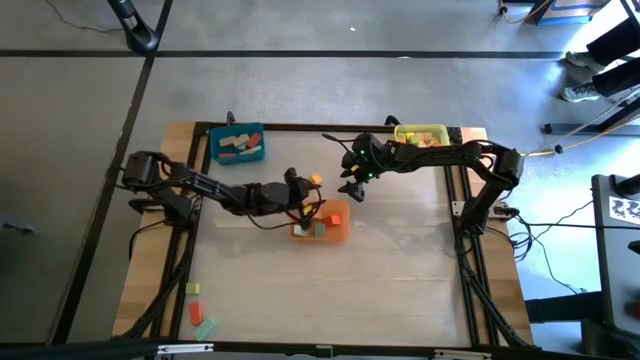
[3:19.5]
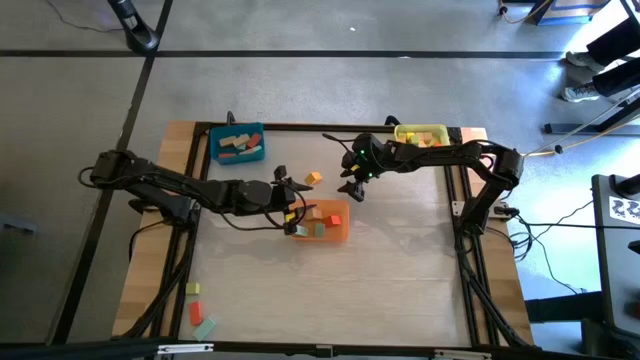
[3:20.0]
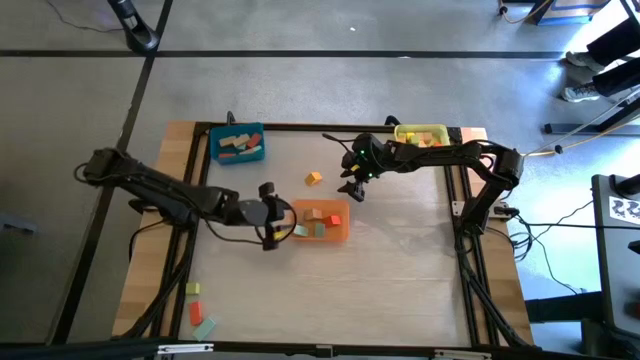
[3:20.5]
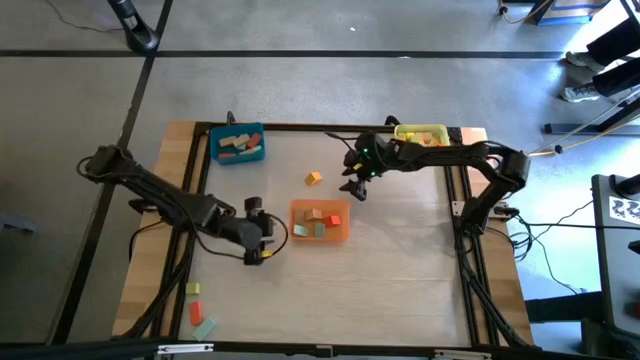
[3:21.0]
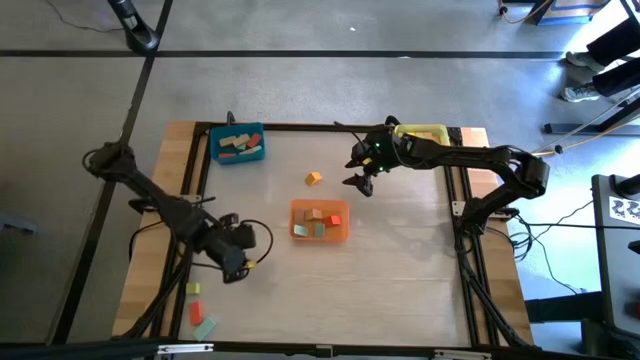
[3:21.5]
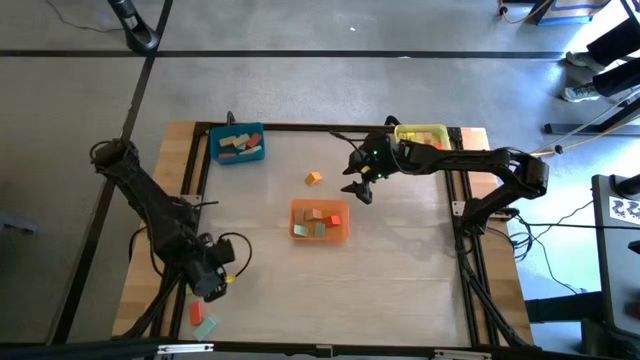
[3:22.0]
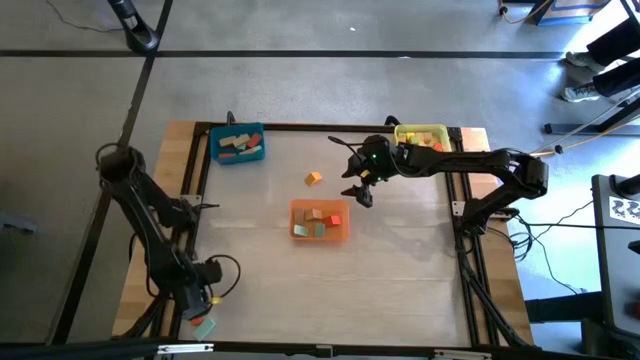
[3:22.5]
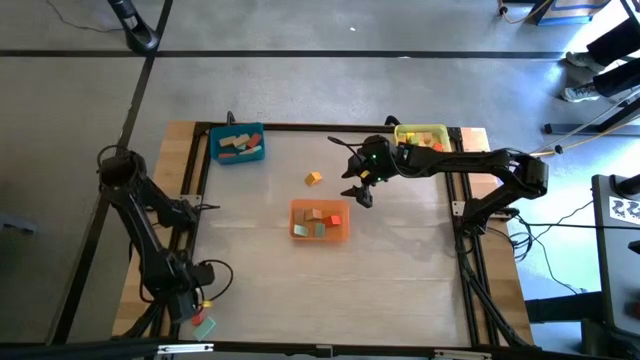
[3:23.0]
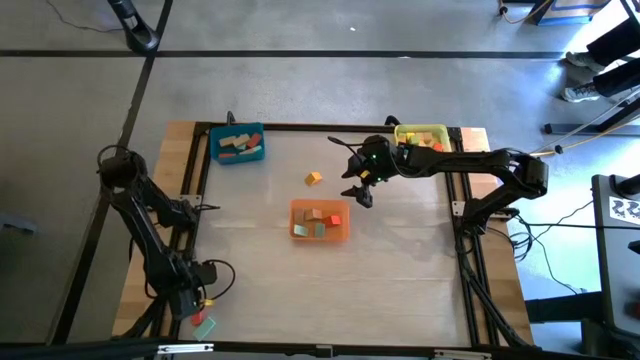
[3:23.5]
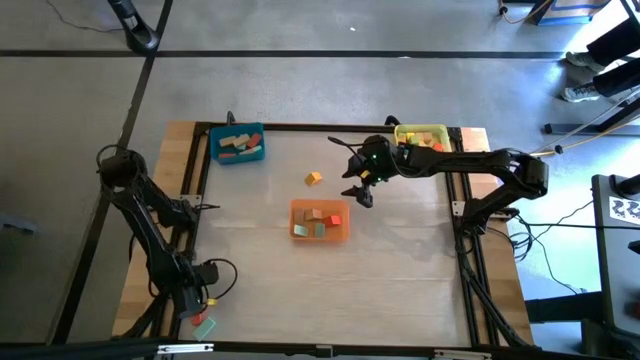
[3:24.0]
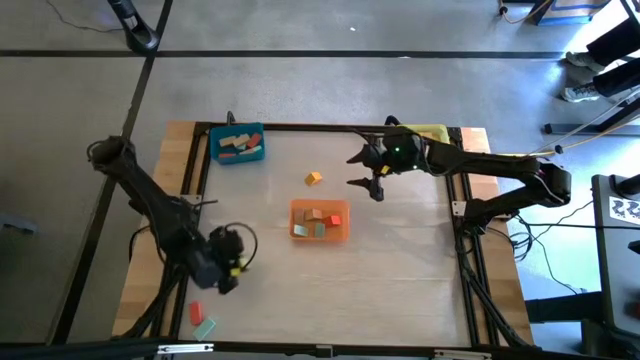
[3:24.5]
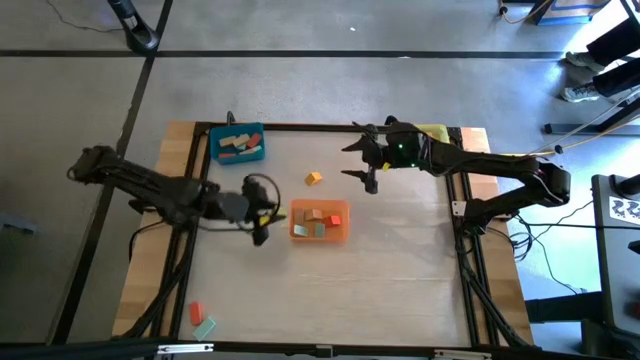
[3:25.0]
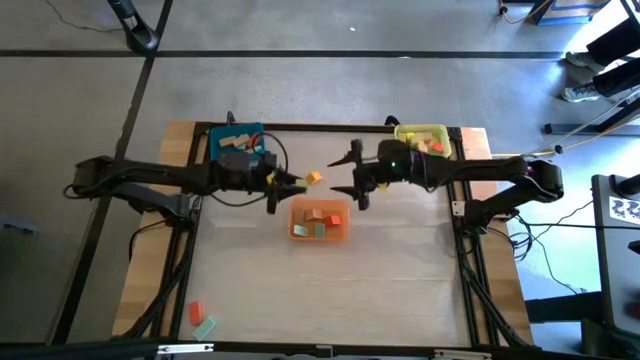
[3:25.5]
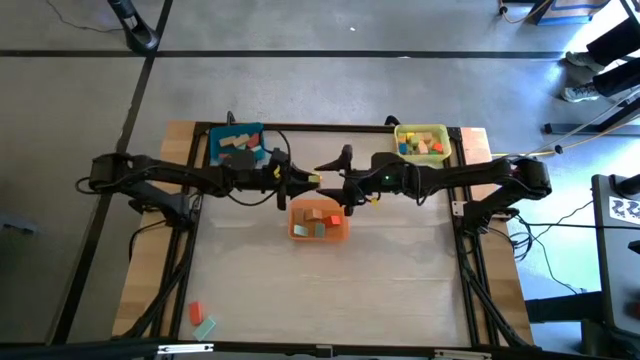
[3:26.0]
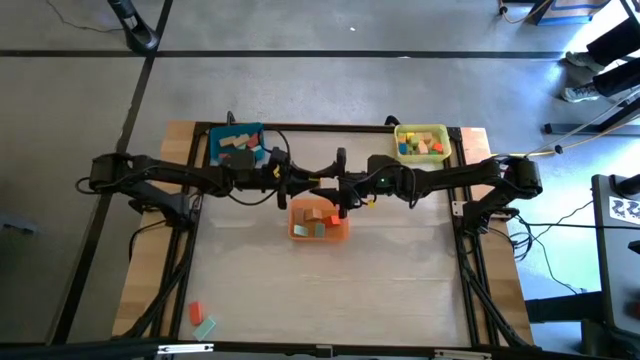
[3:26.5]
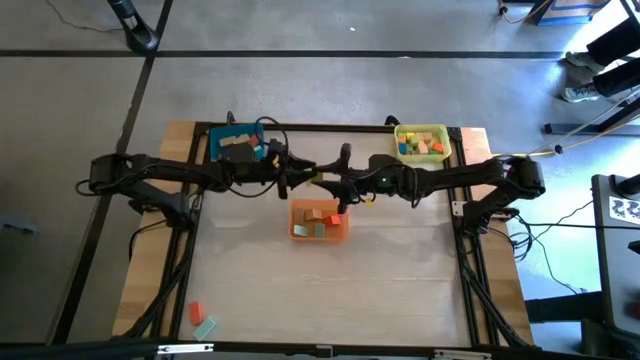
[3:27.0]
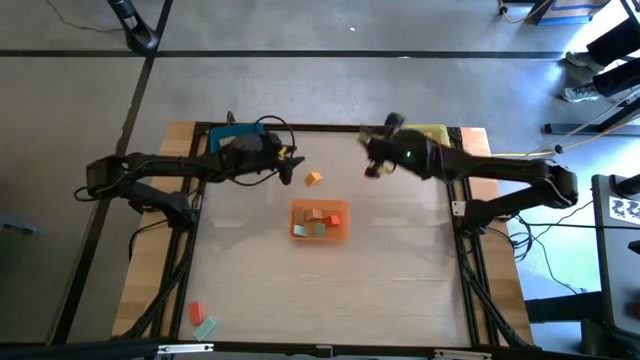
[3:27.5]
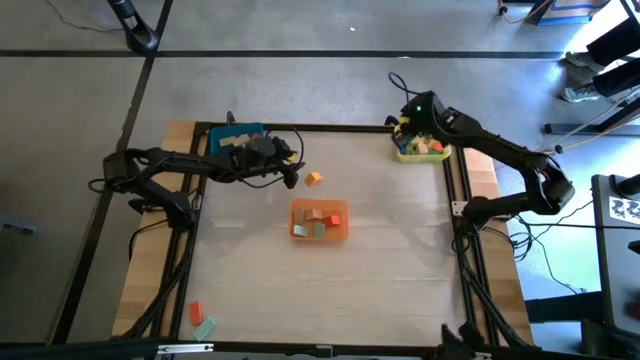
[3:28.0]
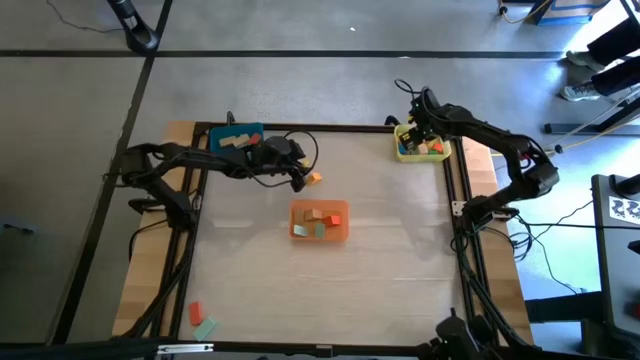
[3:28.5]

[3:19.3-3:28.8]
Task: Sort blocks by size
Put the light green cube block into the yellow bin

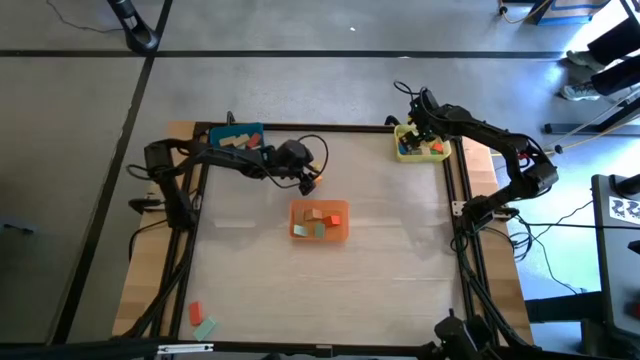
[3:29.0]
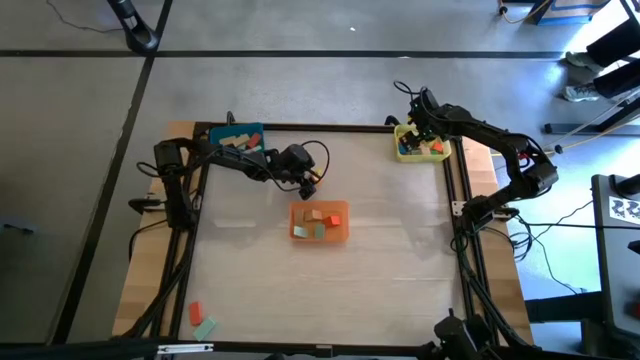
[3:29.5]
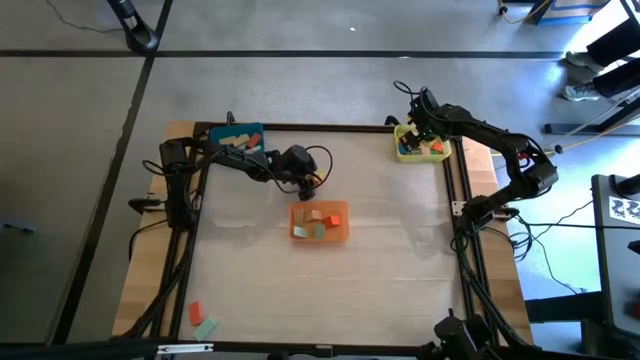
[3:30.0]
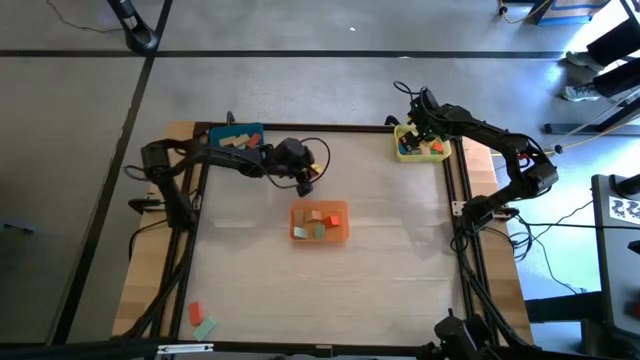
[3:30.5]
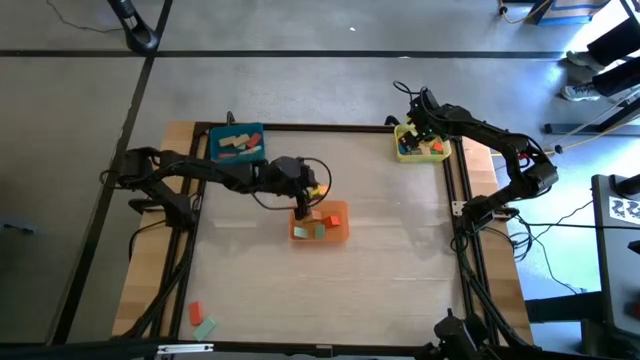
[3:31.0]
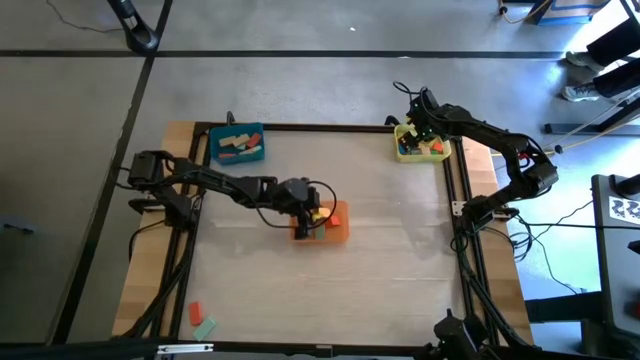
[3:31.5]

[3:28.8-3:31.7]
Put the yellow triangular block into the orange bin

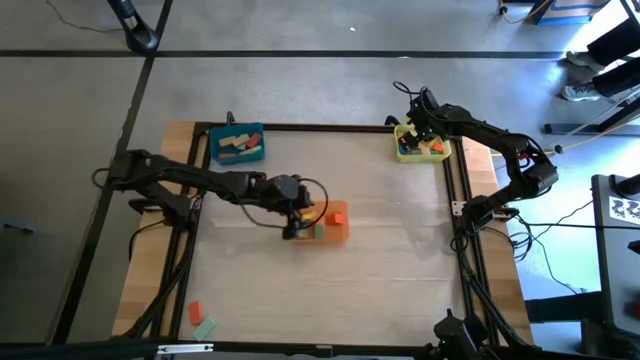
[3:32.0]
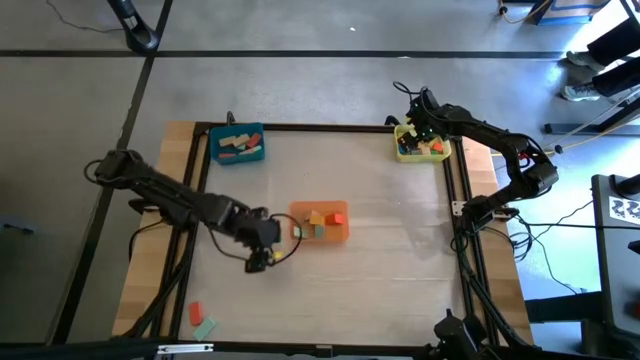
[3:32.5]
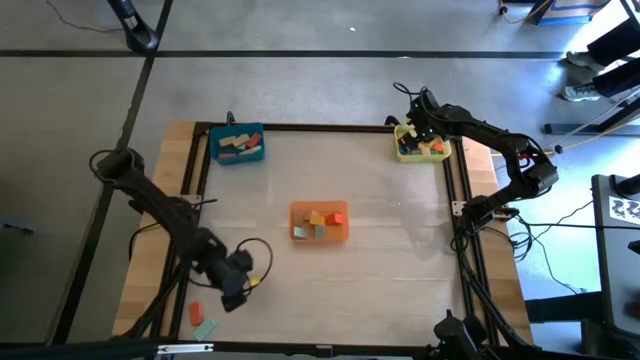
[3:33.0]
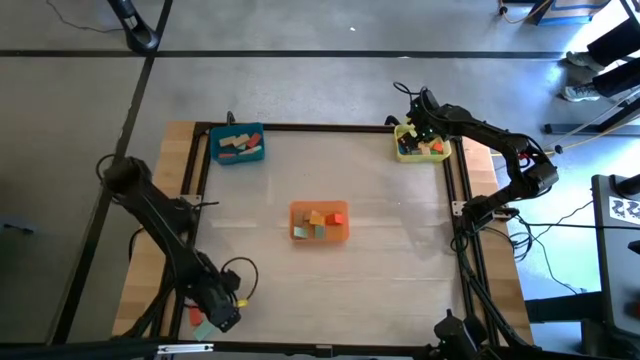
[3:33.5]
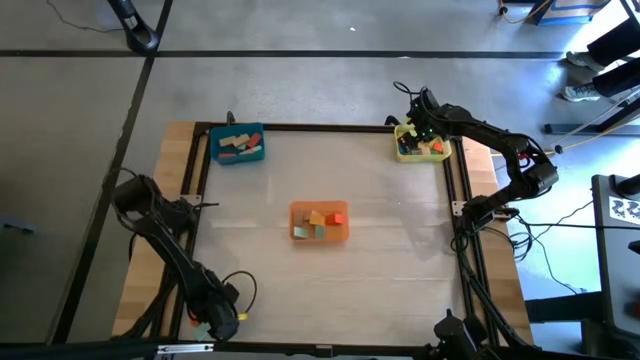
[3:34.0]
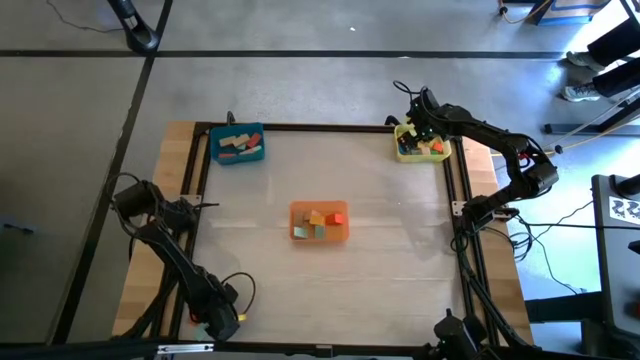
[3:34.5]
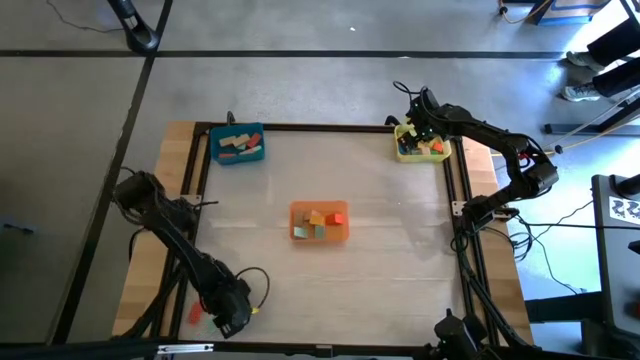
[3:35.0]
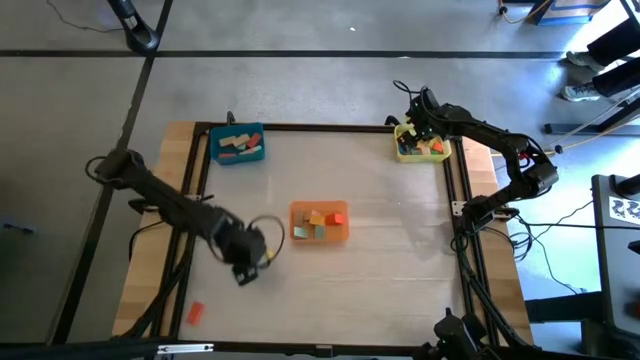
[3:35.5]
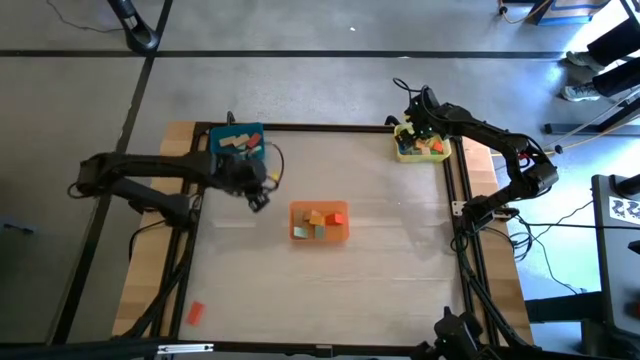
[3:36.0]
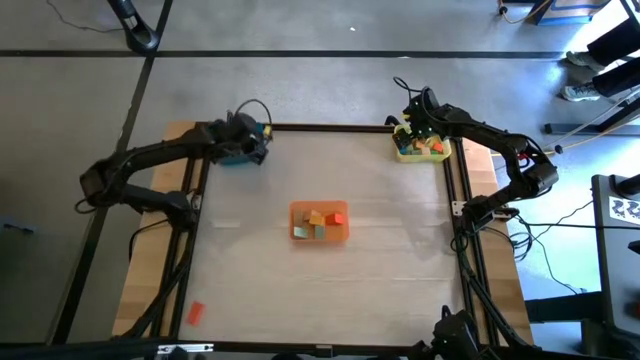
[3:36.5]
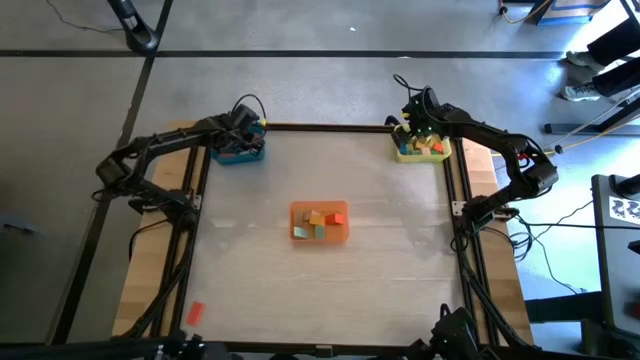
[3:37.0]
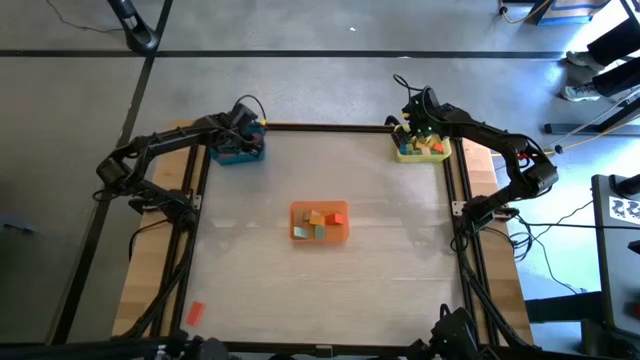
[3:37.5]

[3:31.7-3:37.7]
Put the blue rectangular block into the blue bin

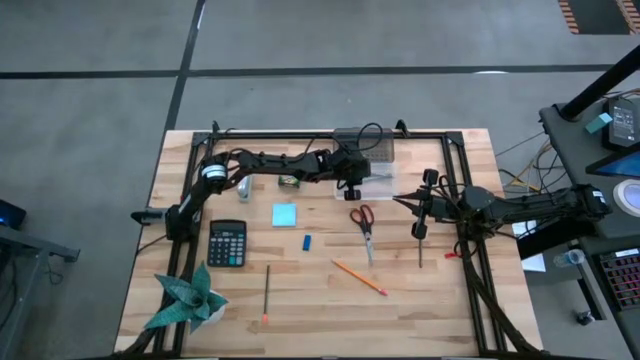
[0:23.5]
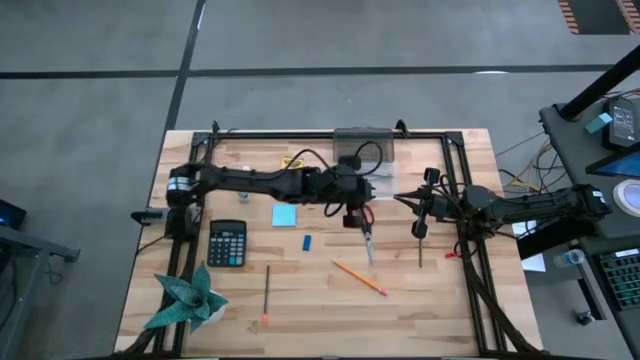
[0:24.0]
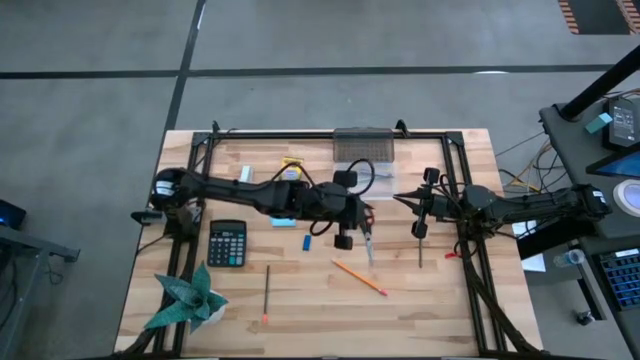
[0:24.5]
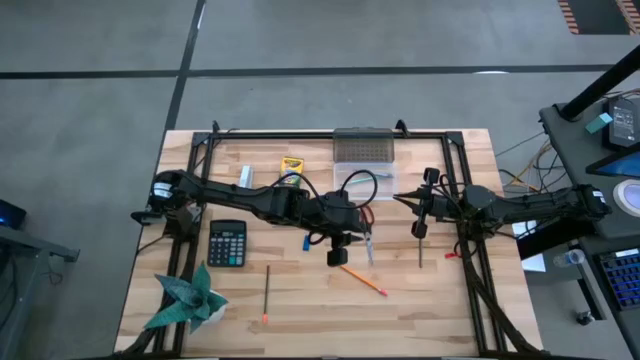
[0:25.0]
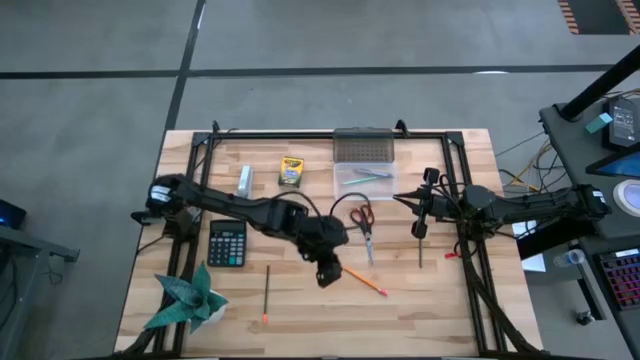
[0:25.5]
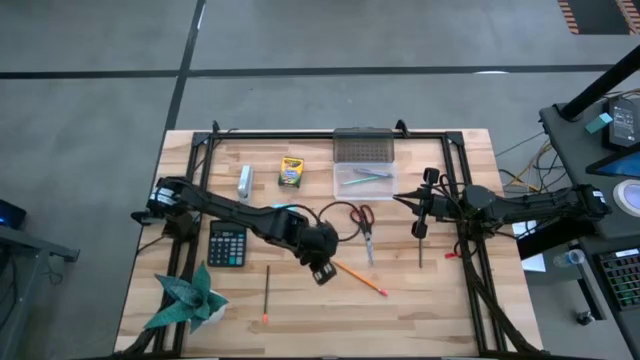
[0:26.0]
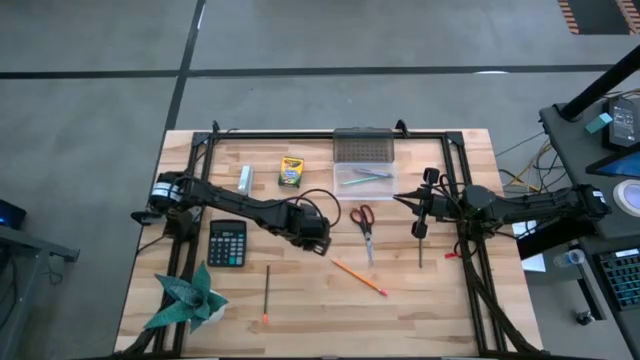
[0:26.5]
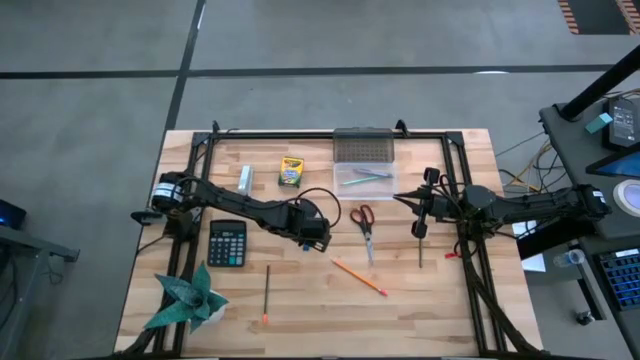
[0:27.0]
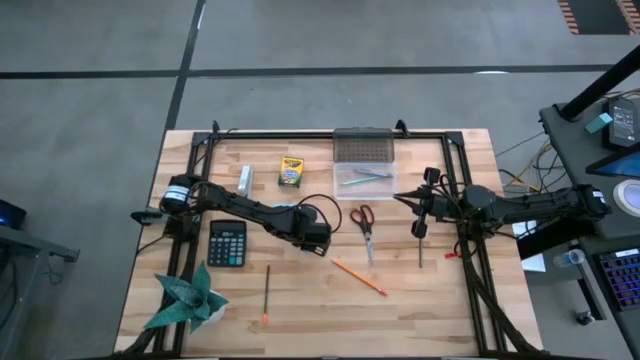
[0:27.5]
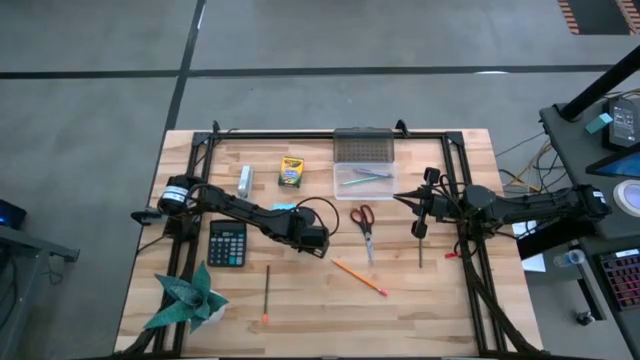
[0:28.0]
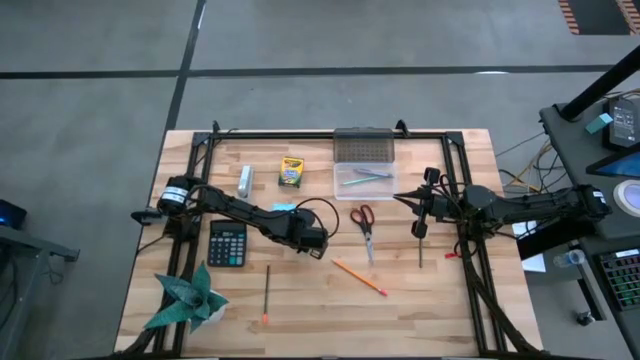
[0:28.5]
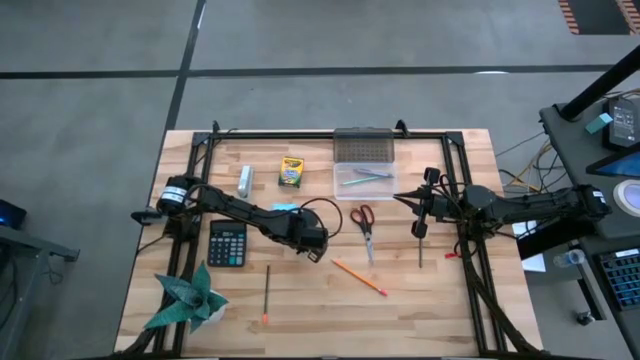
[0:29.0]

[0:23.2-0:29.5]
Task: Pack school essentials
Put the blue eraser into the transparent supply box
